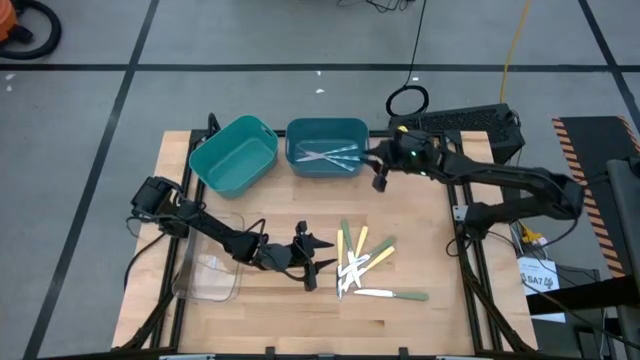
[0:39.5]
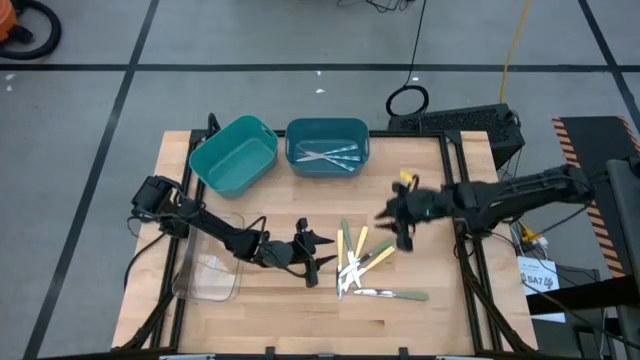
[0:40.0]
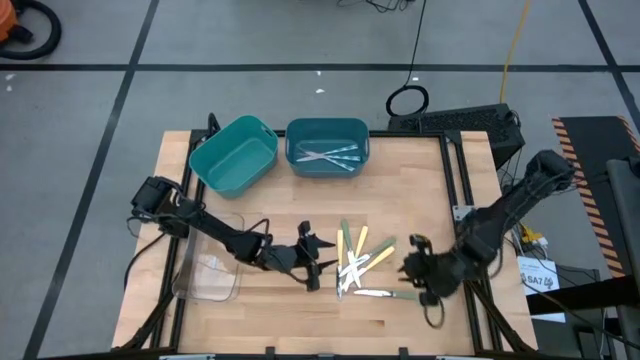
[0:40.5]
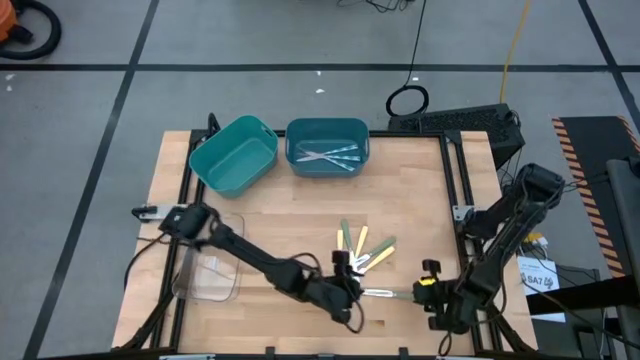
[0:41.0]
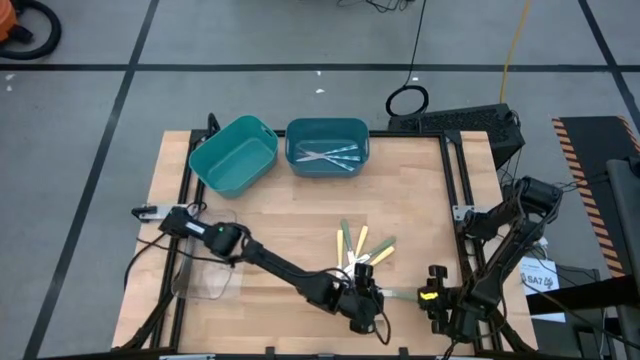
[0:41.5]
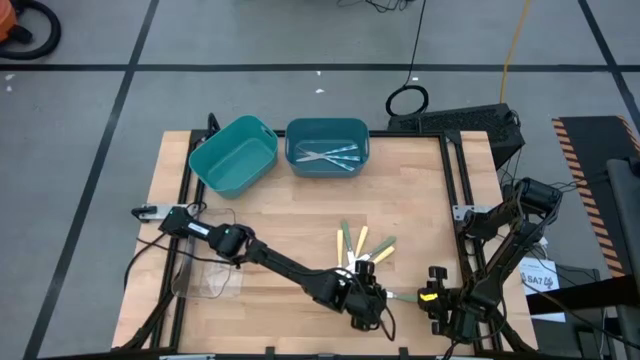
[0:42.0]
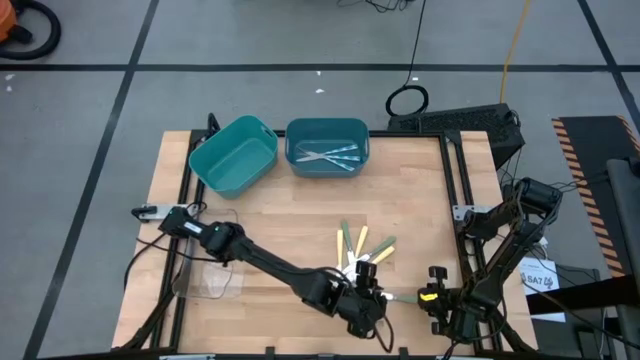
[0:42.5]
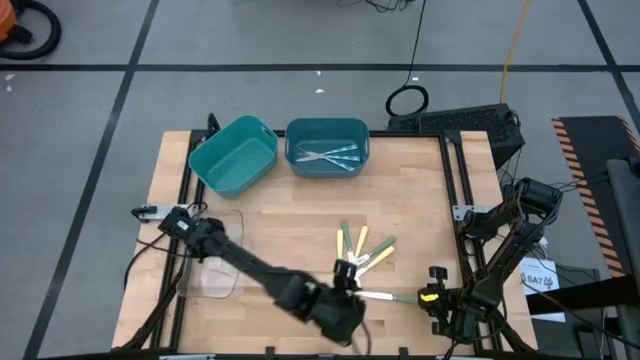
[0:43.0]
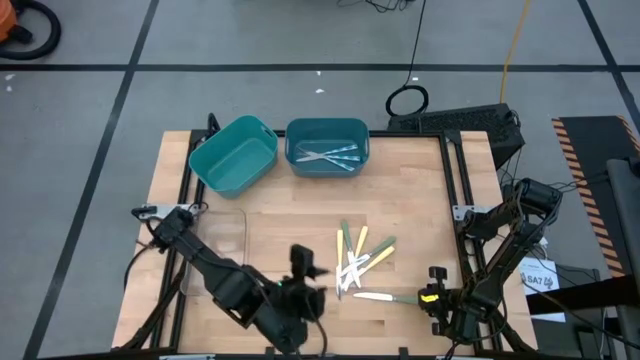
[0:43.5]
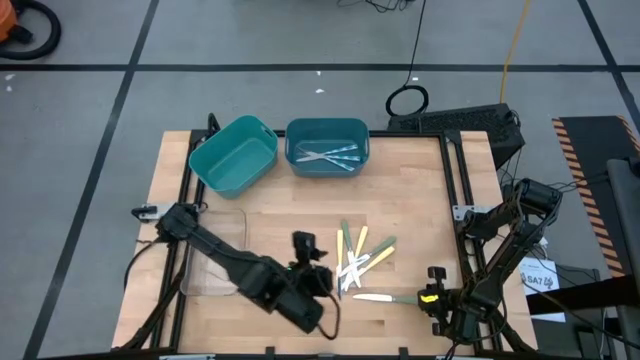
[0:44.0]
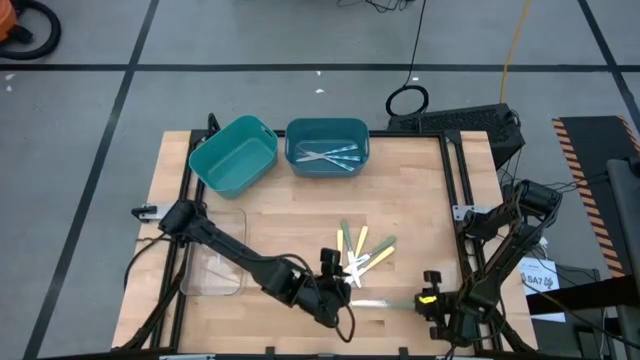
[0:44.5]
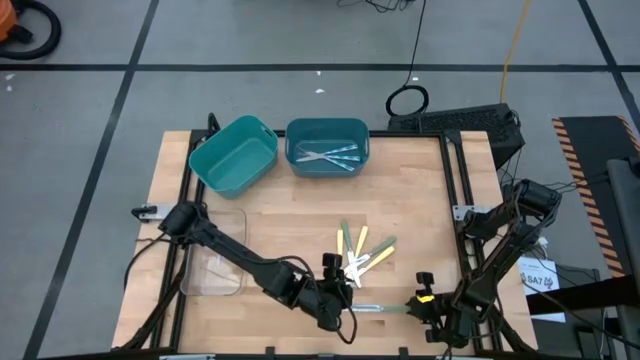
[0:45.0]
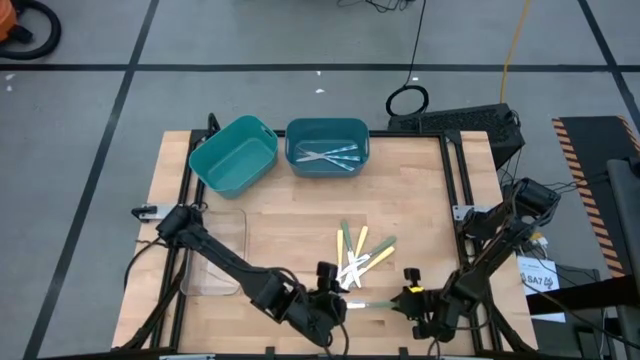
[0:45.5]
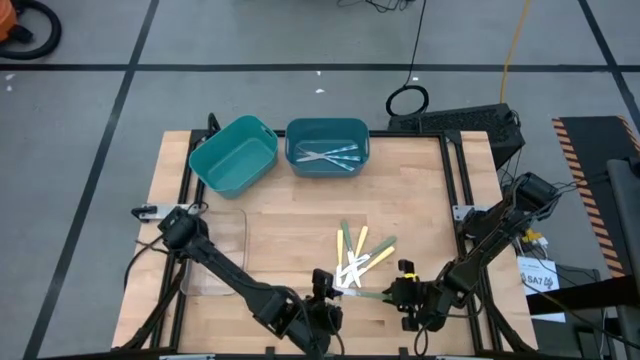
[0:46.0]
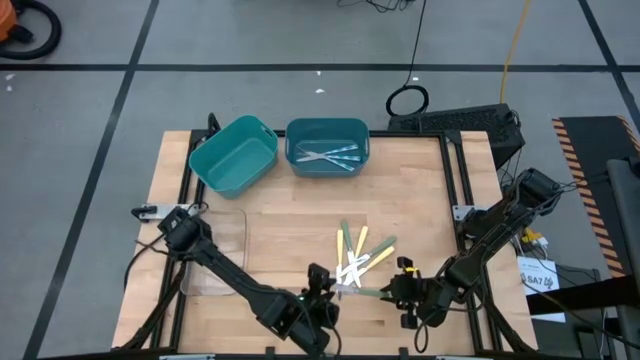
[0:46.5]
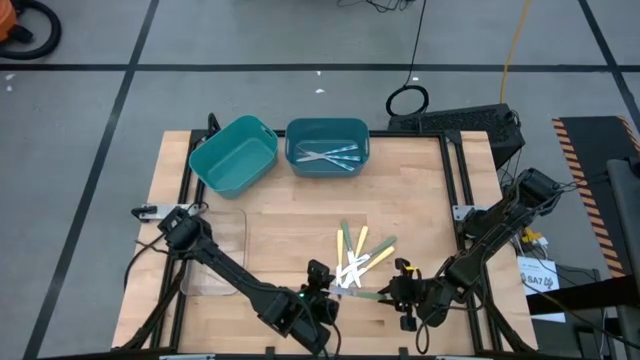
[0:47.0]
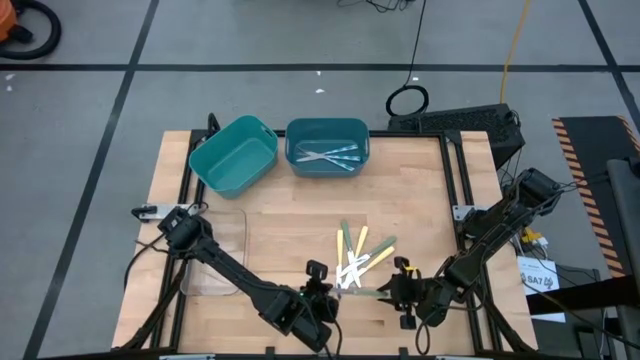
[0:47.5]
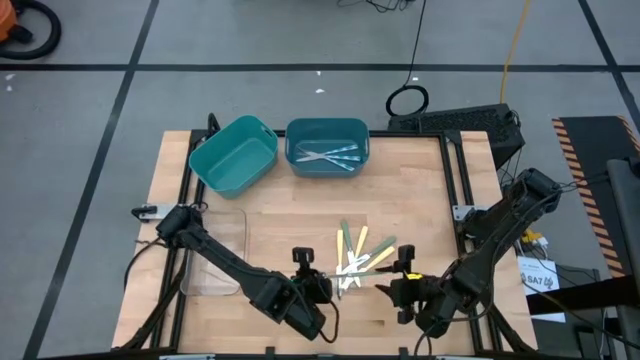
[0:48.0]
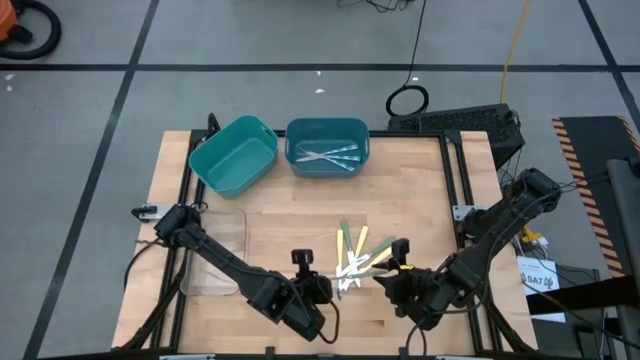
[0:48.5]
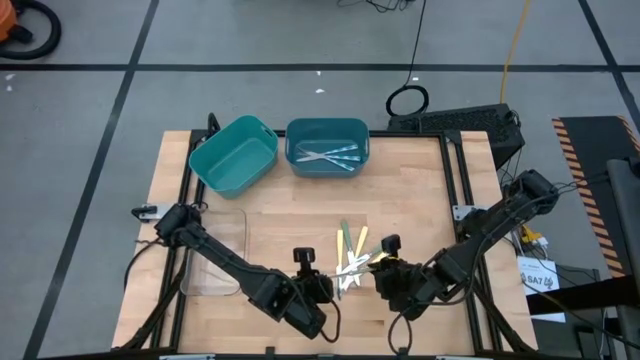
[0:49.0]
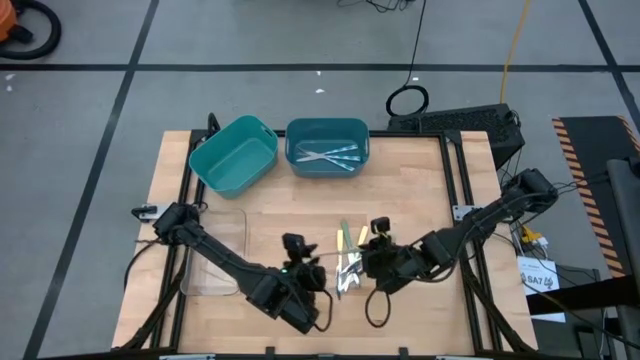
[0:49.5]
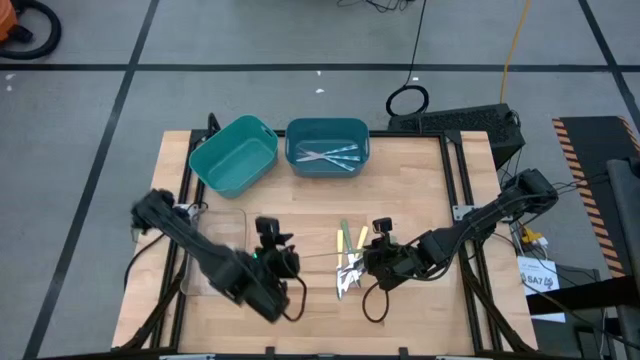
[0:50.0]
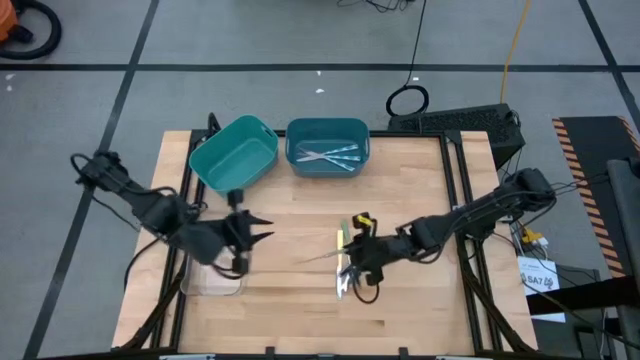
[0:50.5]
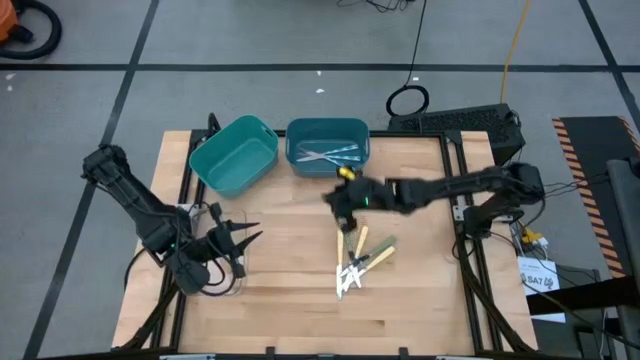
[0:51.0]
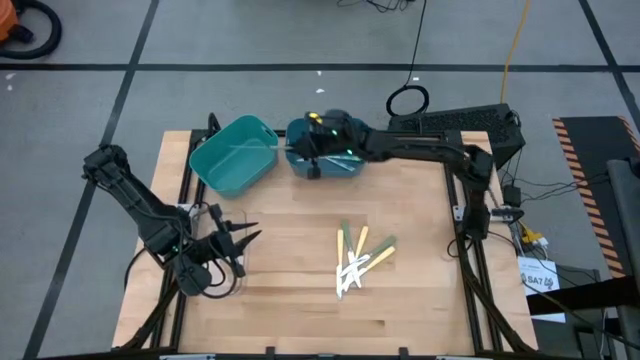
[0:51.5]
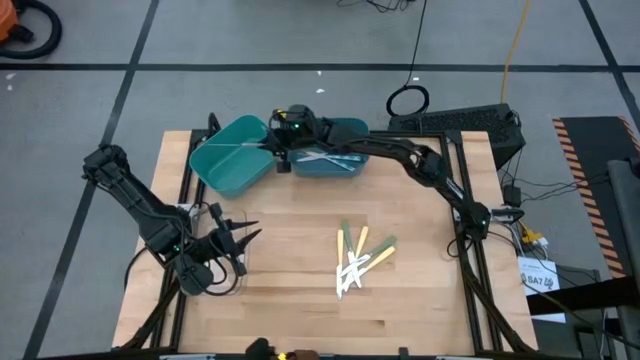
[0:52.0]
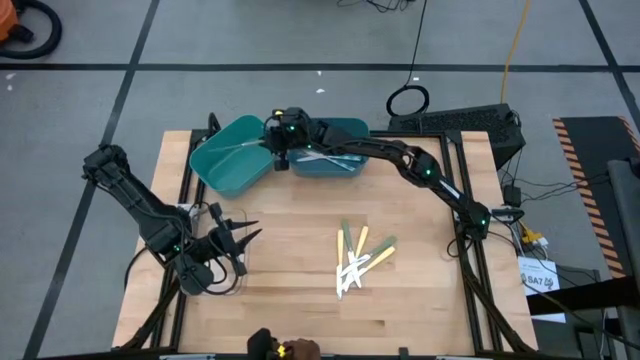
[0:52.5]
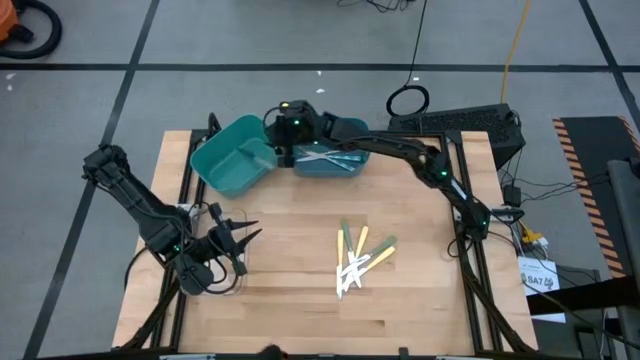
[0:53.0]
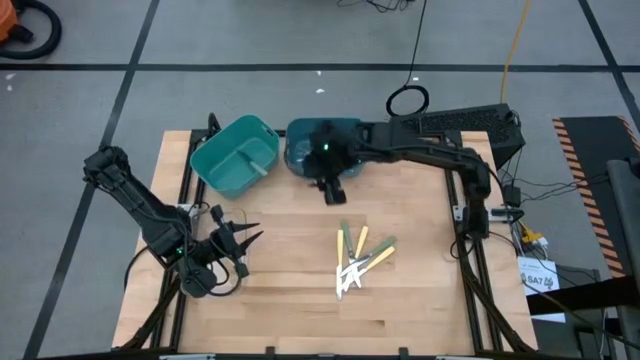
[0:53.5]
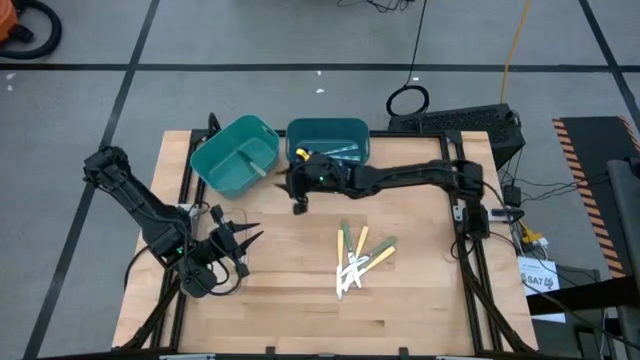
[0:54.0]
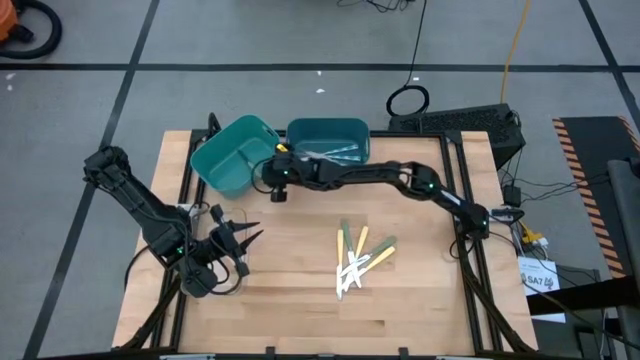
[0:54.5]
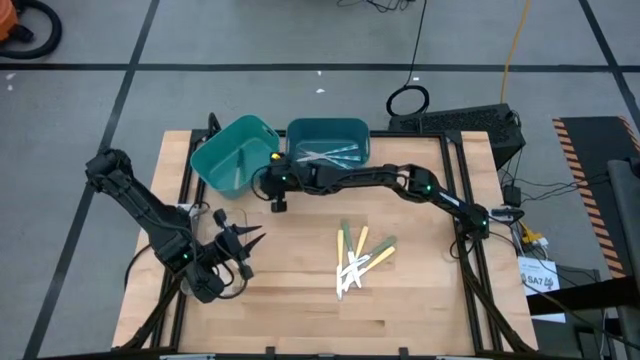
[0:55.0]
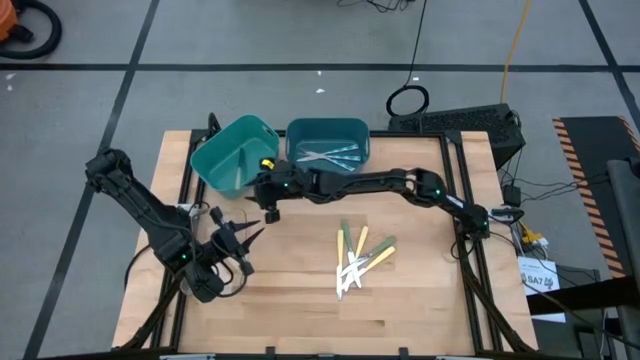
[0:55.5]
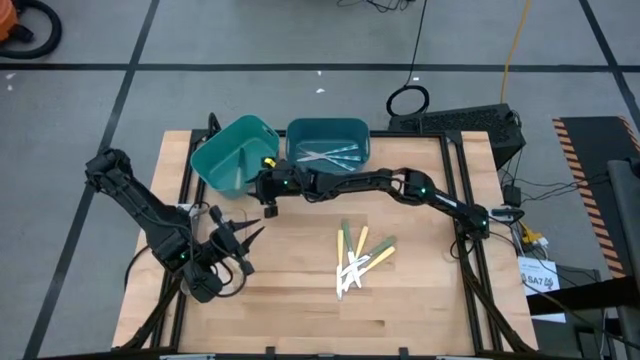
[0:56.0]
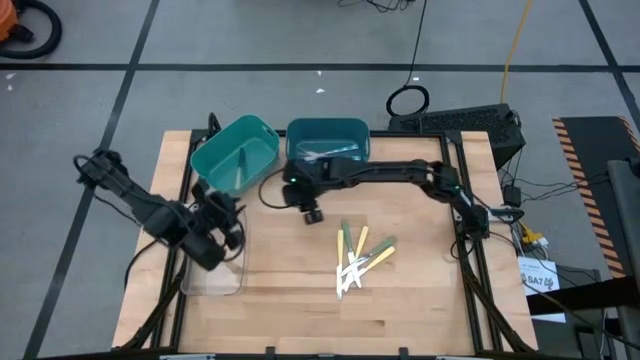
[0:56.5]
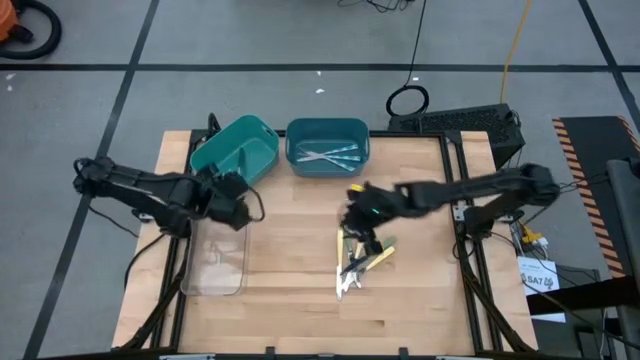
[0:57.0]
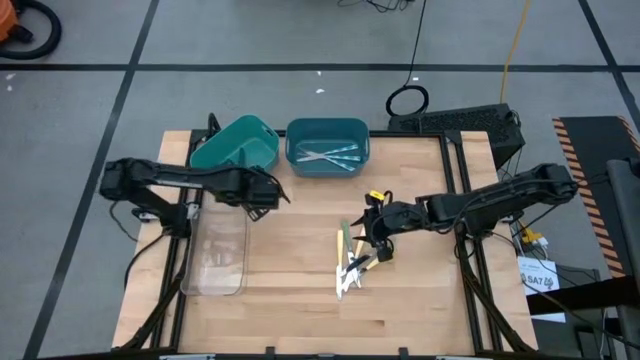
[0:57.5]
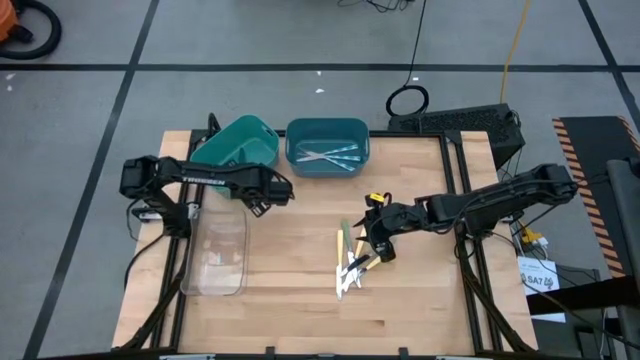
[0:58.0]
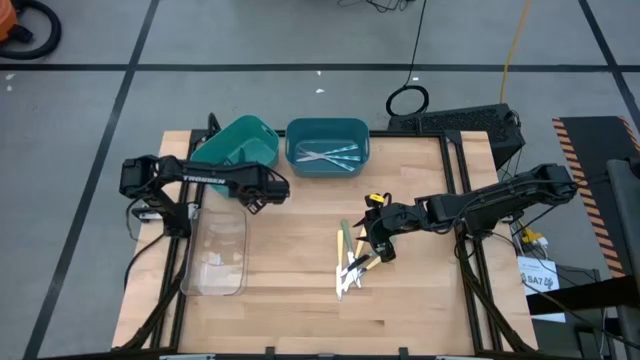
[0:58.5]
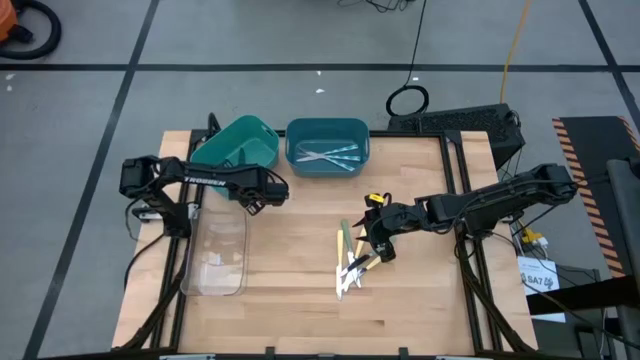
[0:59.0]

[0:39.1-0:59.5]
Task: Sort silverware by color (type)
Put the bottom green table knife into the green bin

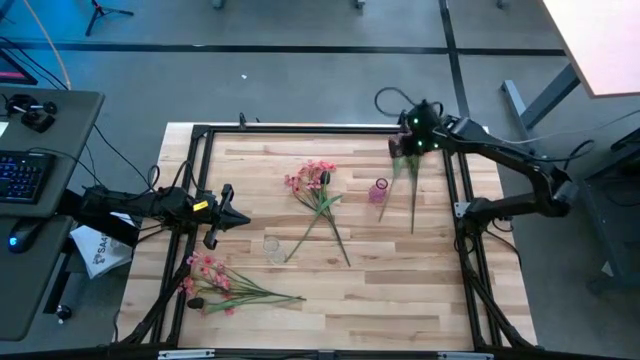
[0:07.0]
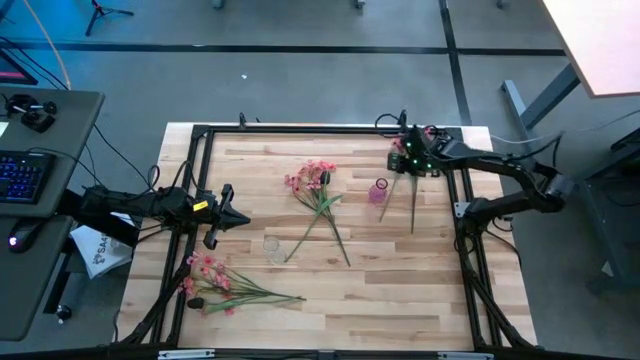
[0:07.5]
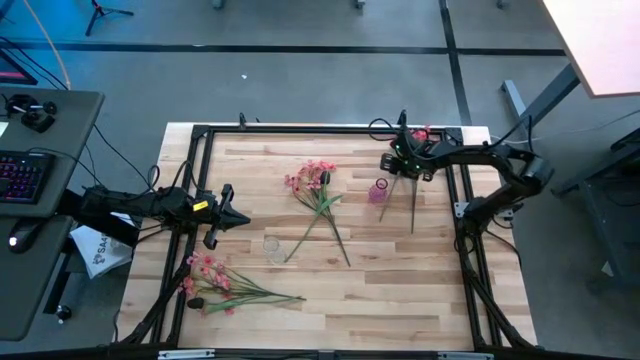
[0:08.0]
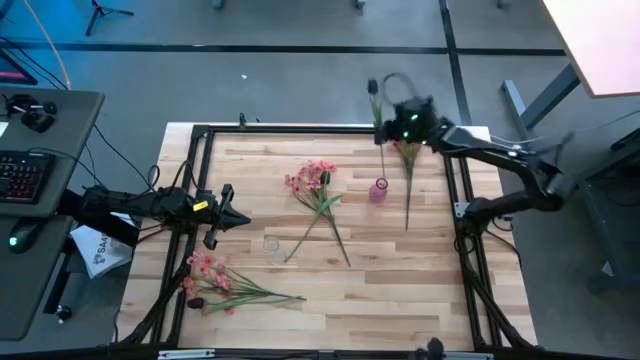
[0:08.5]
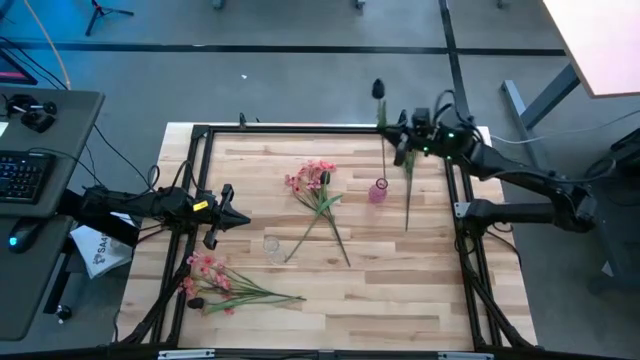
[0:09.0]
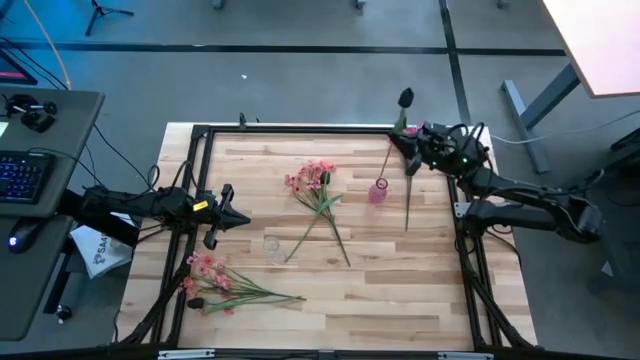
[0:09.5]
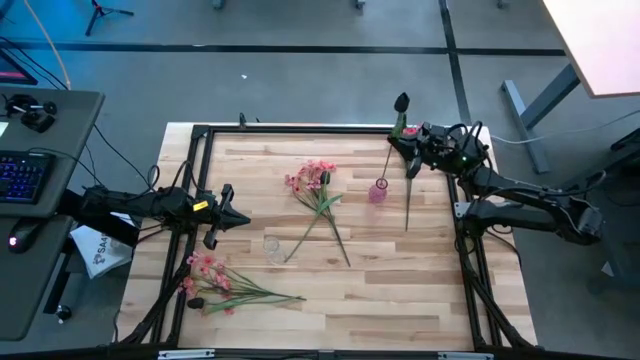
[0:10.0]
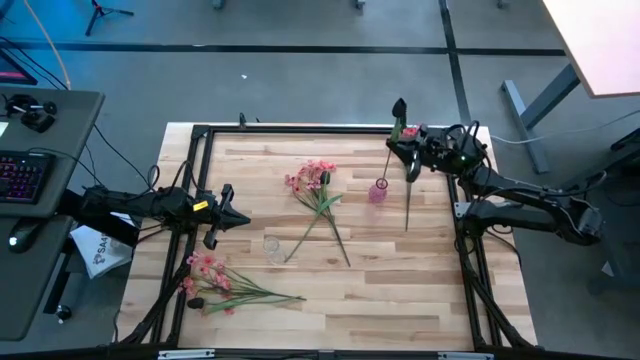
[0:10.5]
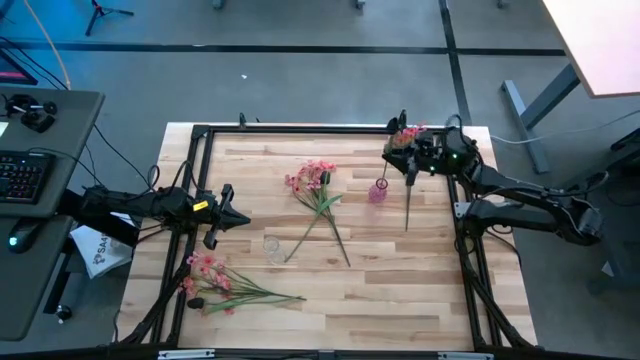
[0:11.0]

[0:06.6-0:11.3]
Task: Sort flowers into vase by color
Put the top right black tulip into the pink vase
